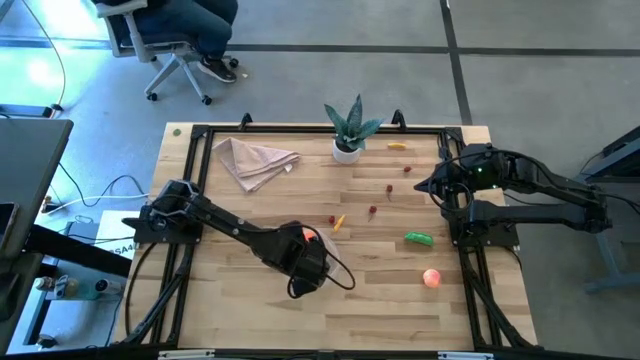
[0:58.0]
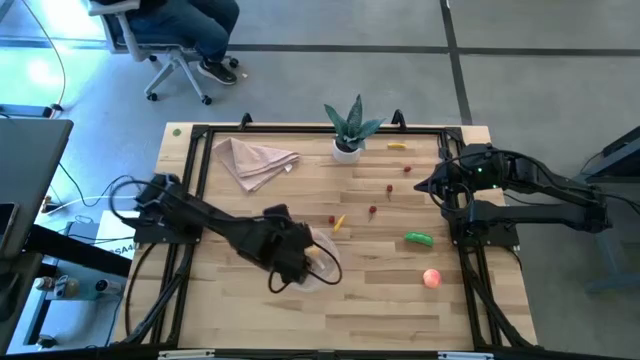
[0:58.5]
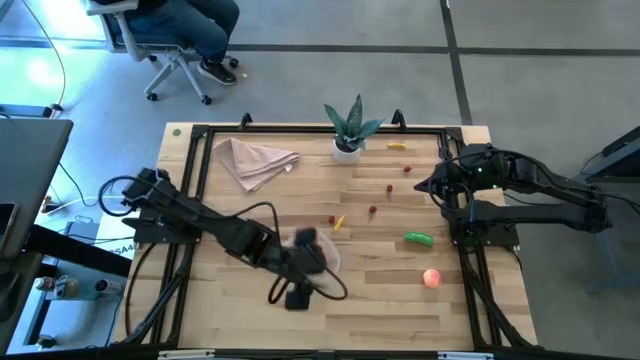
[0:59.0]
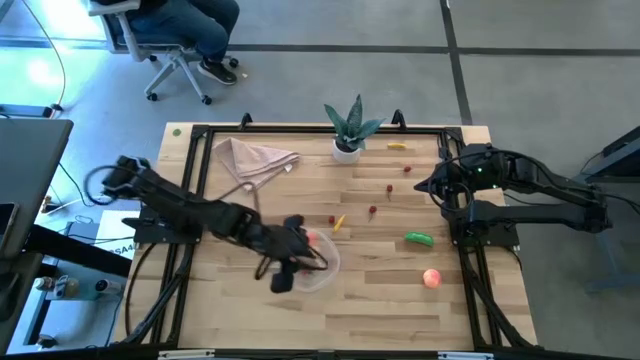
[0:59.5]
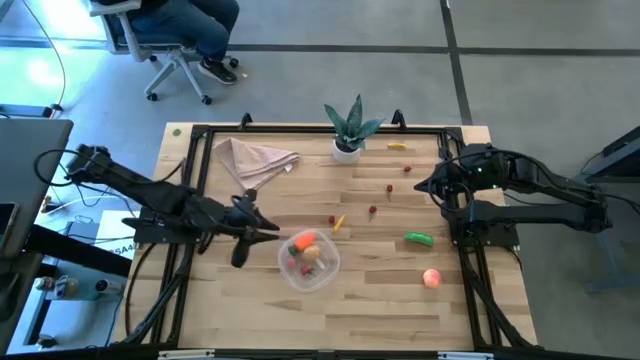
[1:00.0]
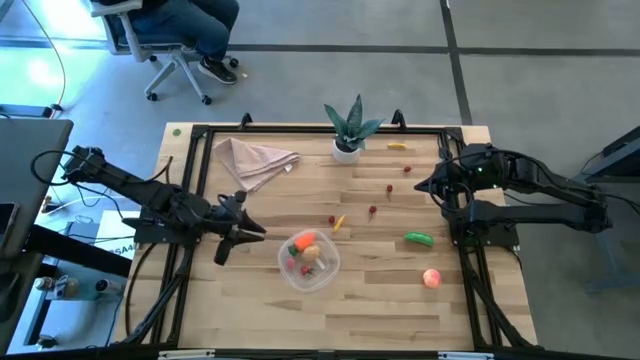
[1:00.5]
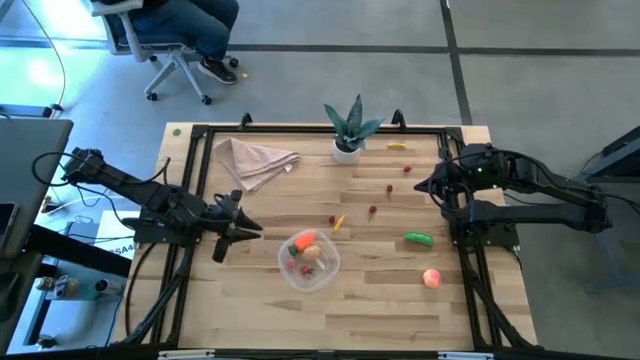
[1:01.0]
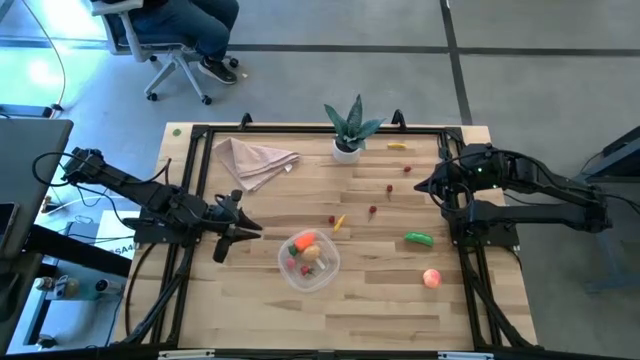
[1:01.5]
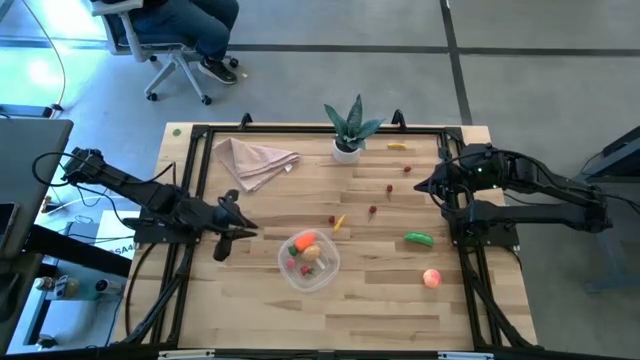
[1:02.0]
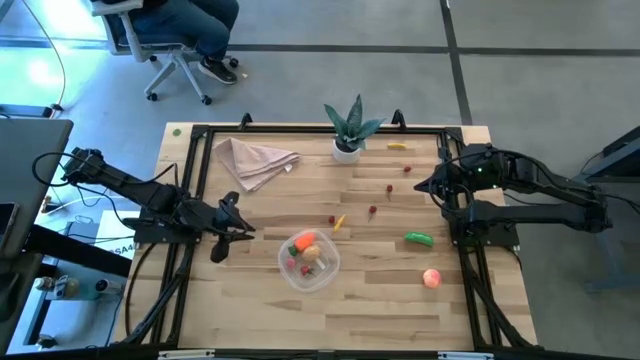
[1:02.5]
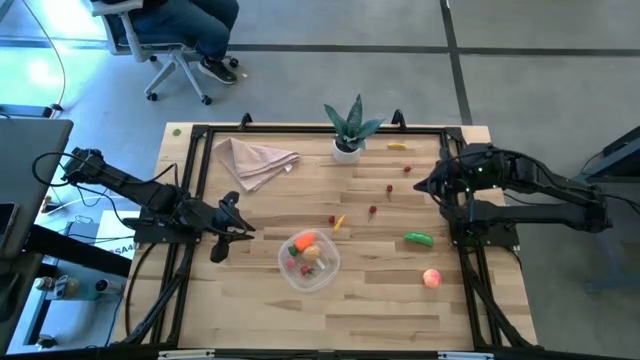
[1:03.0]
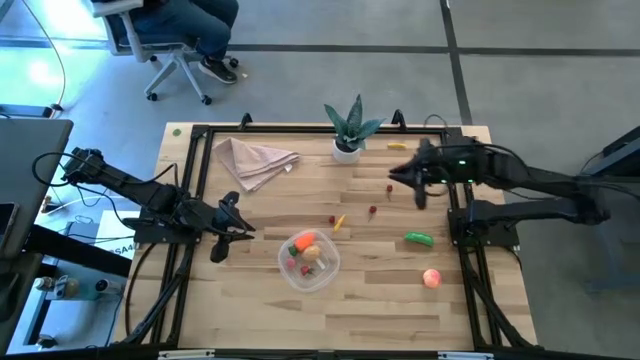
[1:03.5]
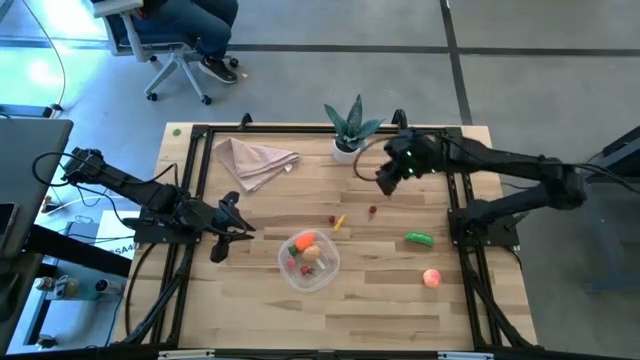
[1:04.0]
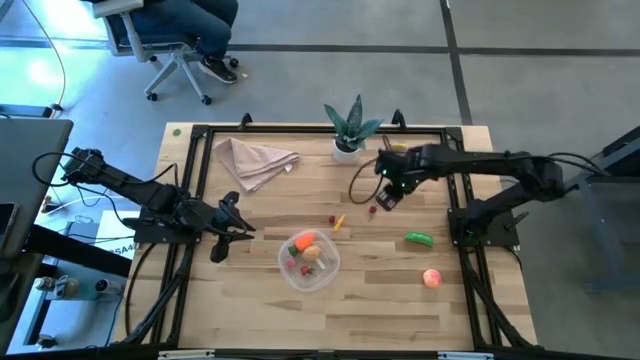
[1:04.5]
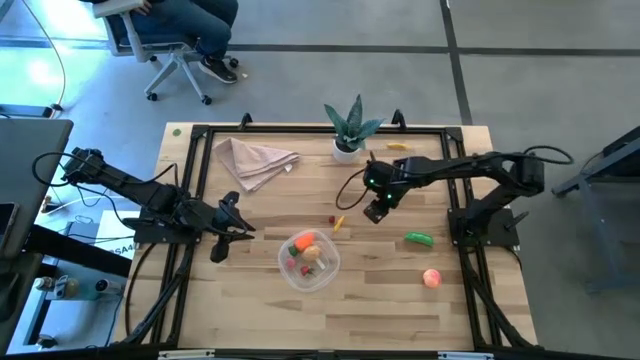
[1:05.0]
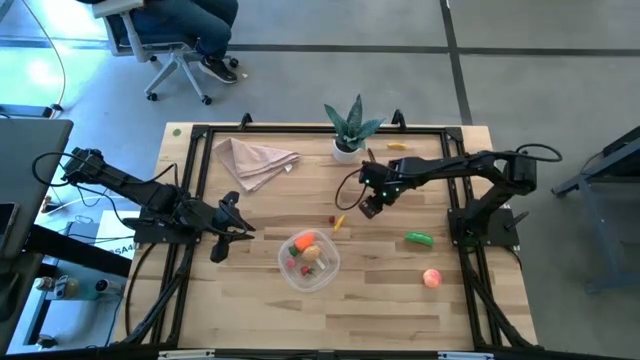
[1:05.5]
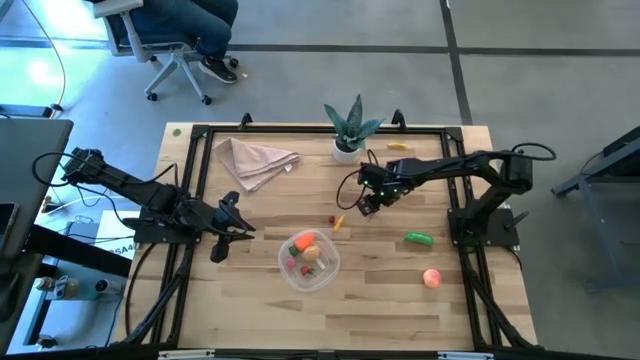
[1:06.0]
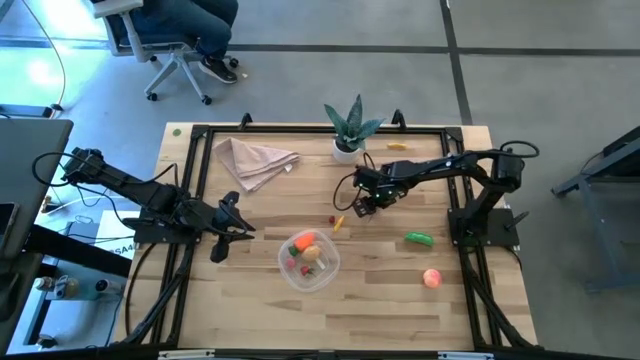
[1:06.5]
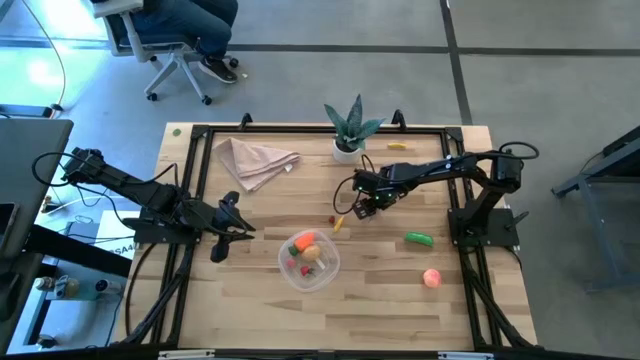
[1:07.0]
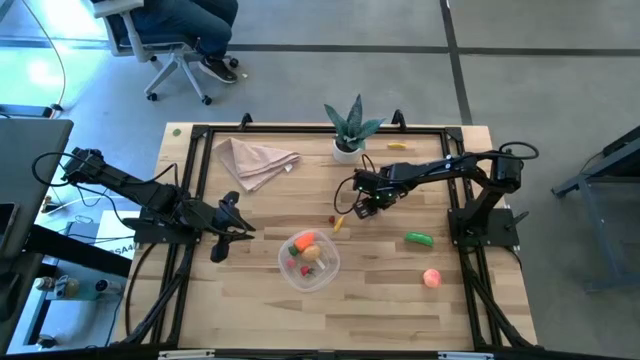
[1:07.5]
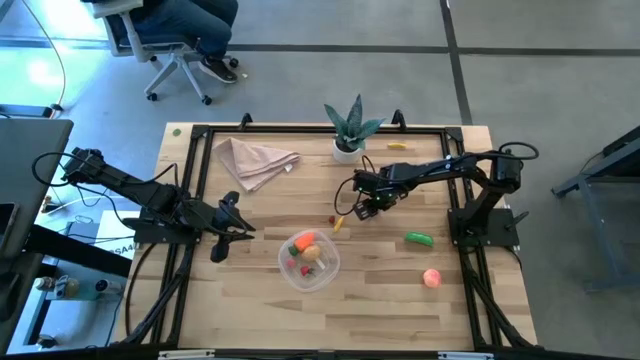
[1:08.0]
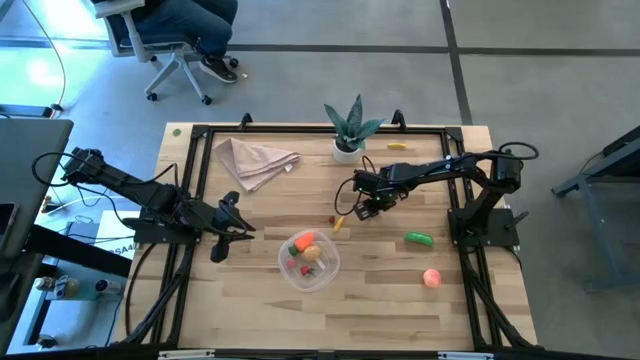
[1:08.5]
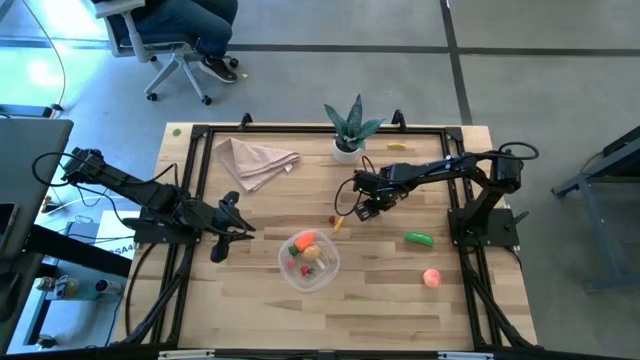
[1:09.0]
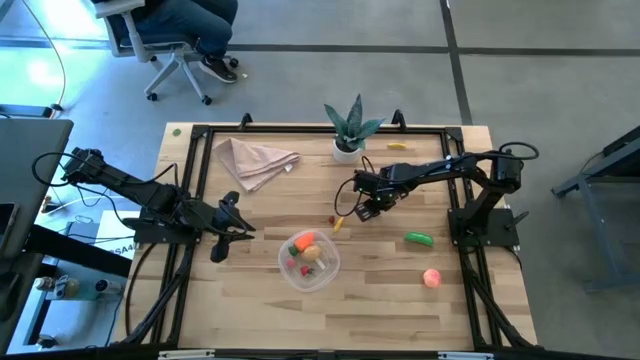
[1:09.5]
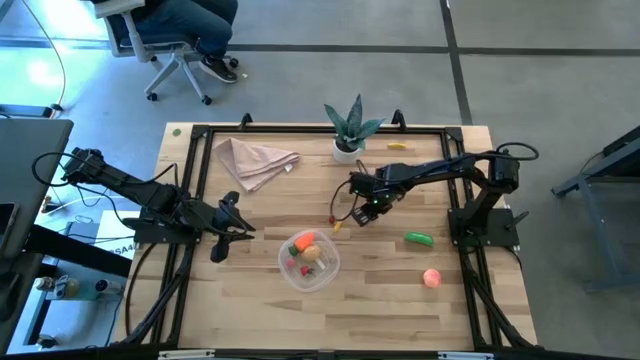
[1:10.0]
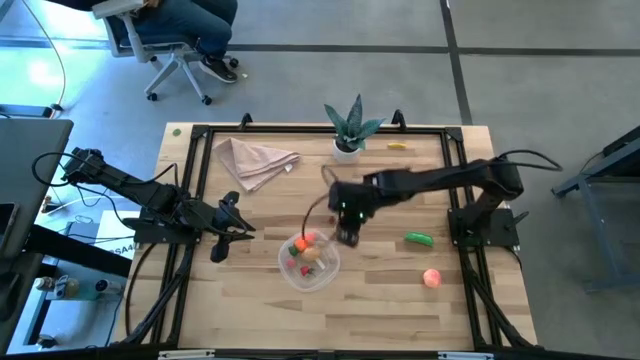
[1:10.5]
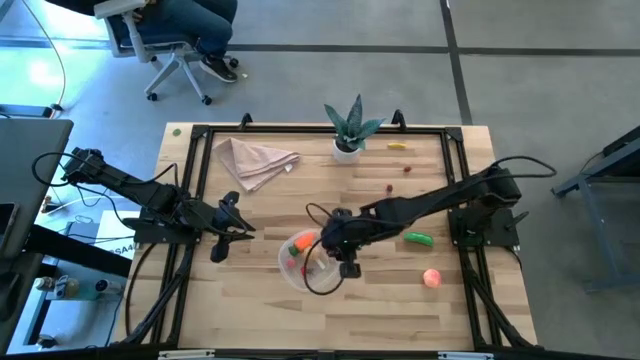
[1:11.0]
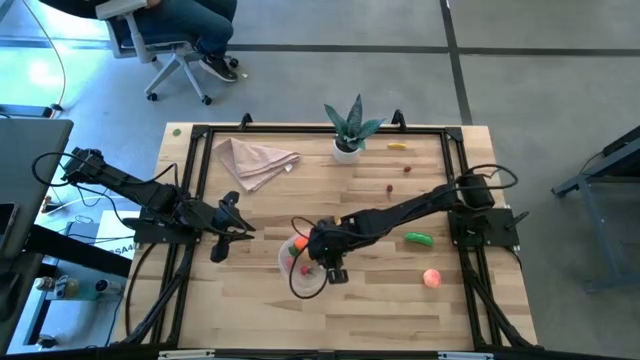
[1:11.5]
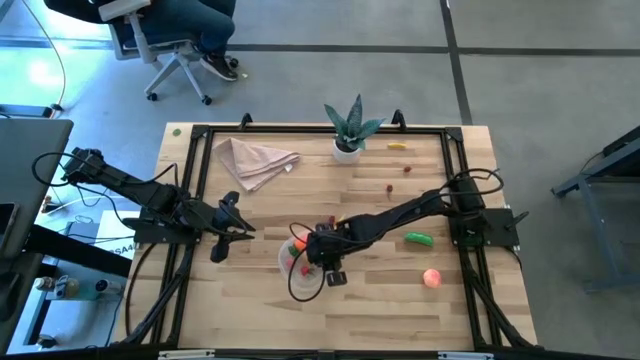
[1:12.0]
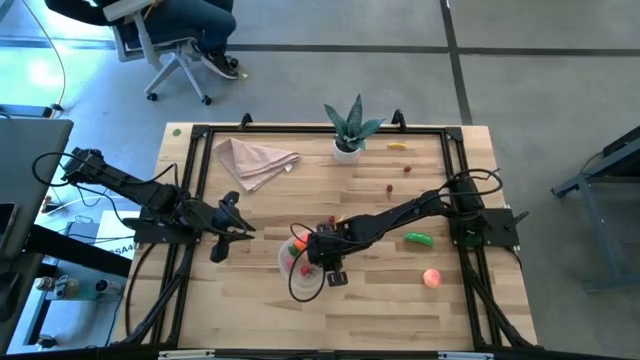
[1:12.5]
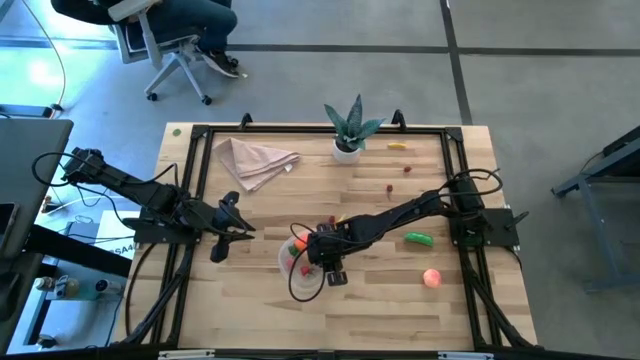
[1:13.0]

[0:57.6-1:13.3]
Task: Pick and placing Produce into tupperware
Put the cherry into the transparent container

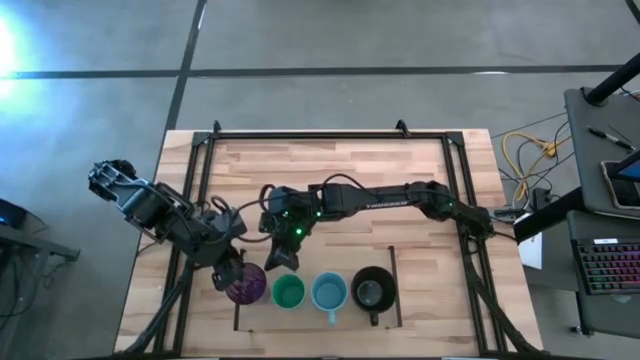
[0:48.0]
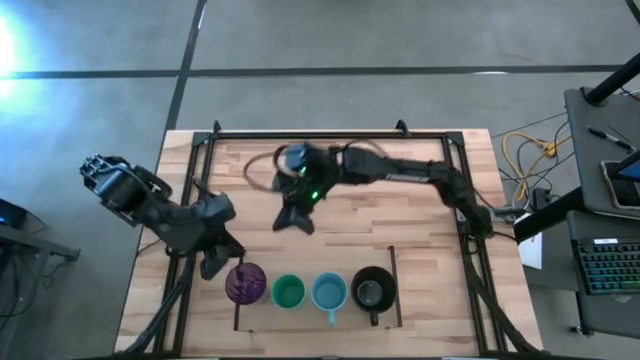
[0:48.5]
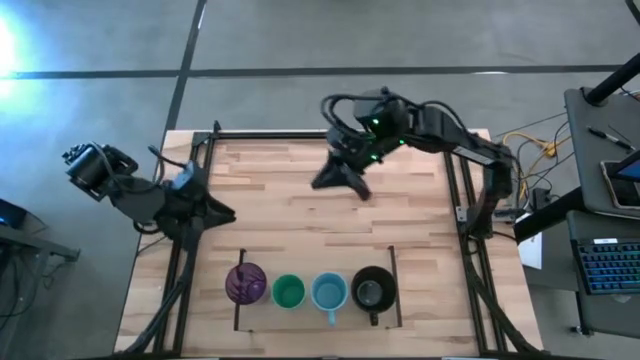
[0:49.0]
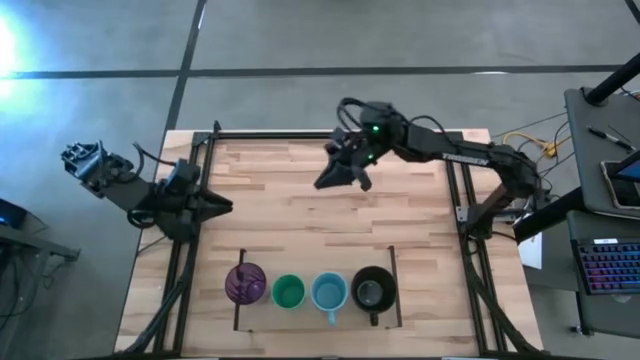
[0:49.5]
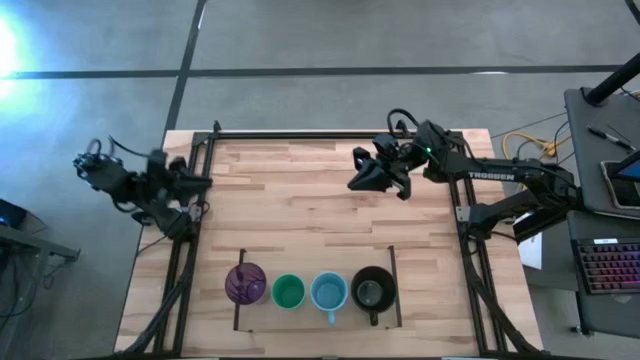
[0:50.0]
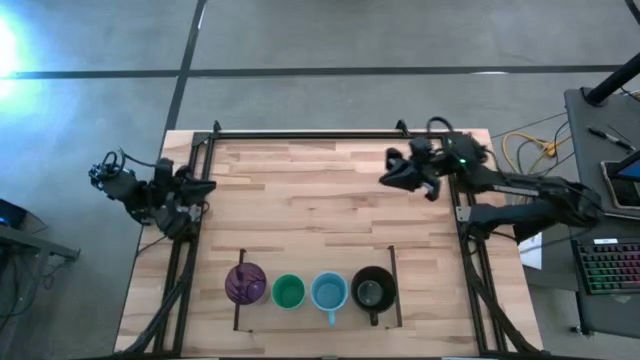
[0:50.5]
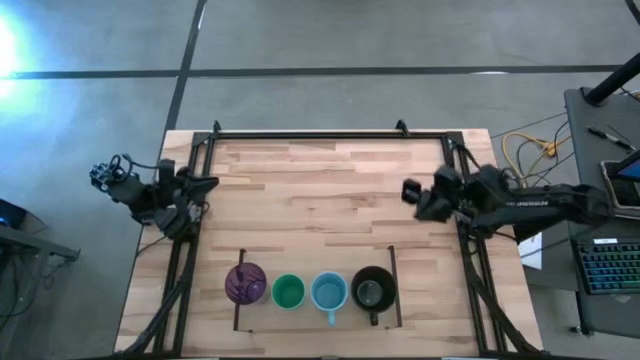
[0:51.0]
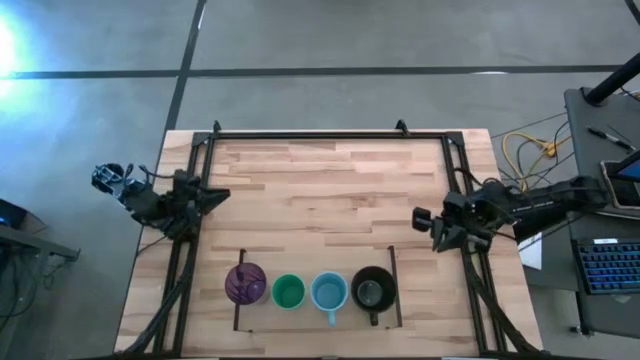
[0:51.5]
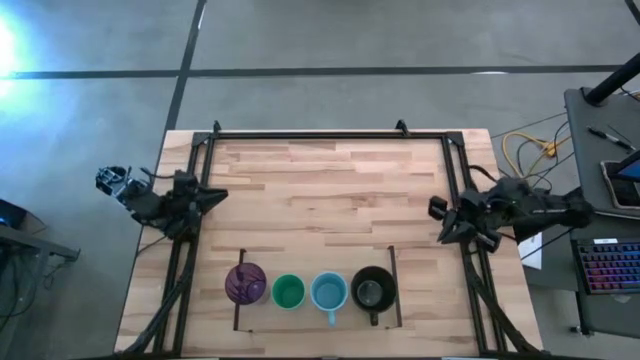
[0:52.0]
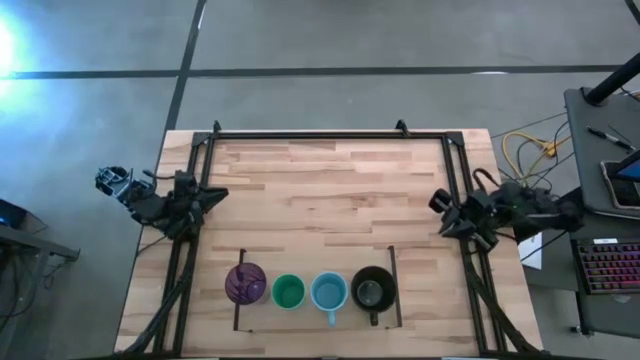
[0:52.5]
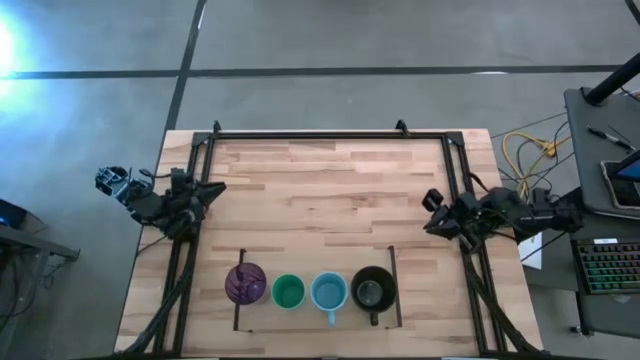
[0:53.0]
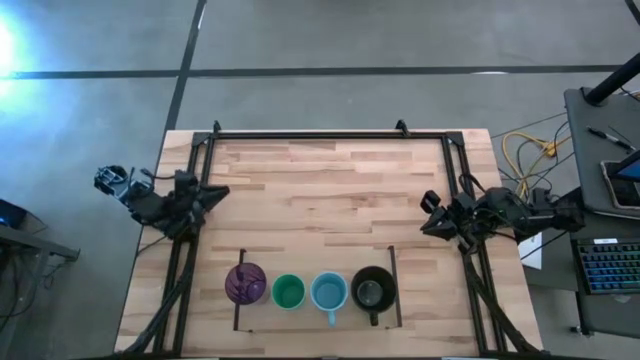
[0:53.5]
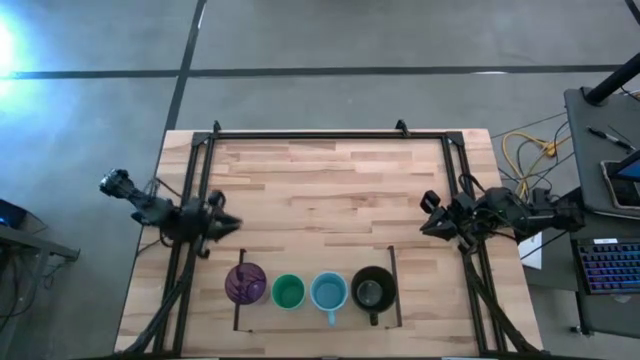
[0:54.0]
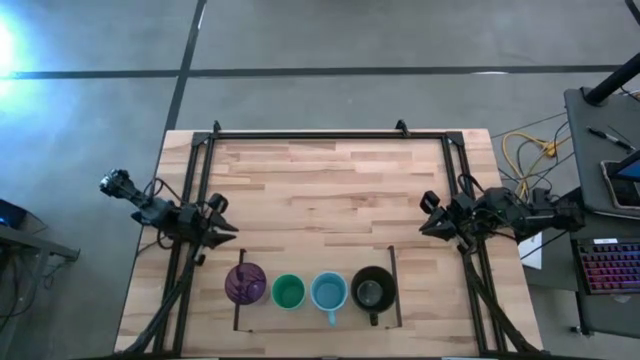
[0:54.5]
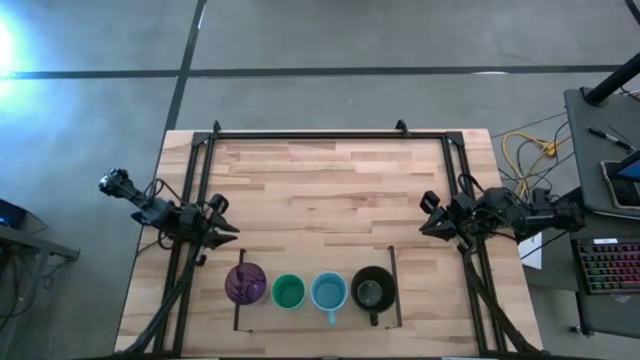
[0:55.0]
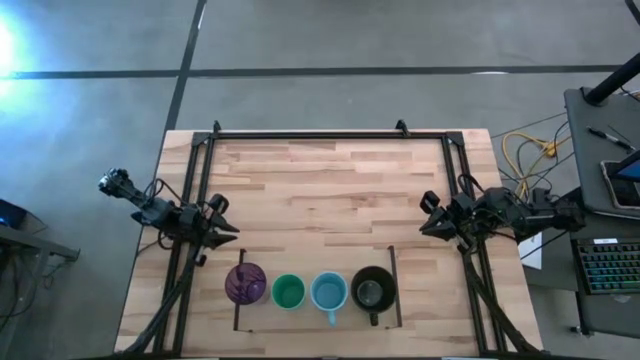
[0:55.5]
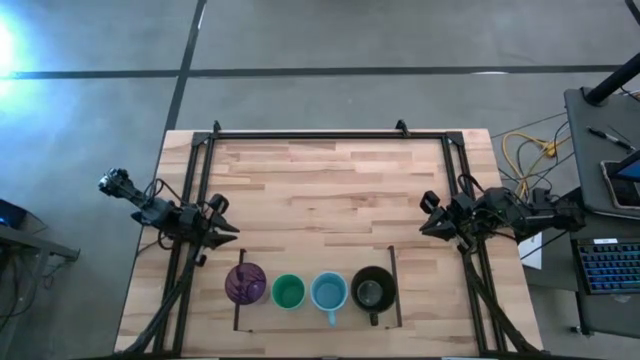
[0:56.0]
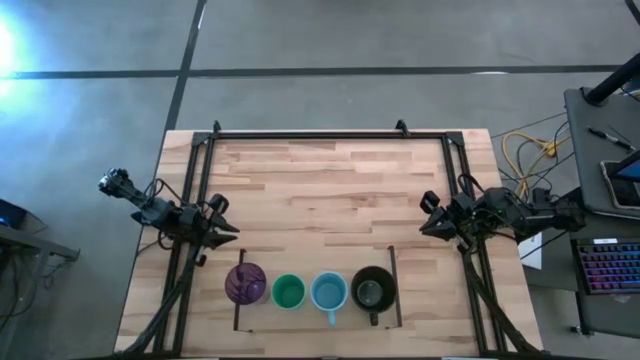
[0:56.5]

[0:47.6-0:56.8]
Task: Stack small to large cups/mugs on shelf
Return to Home Position
